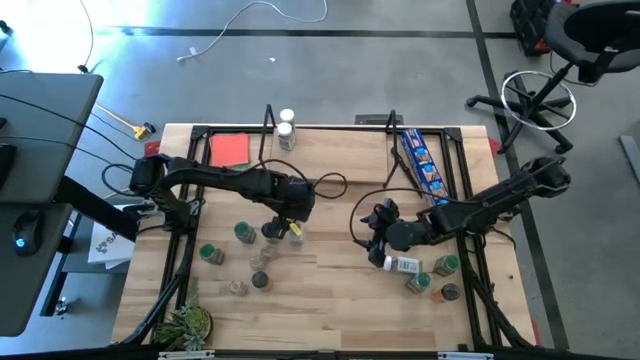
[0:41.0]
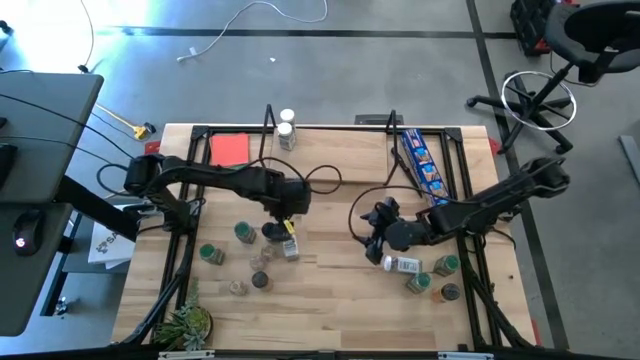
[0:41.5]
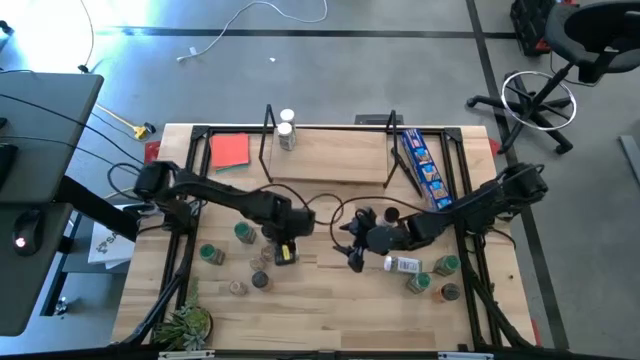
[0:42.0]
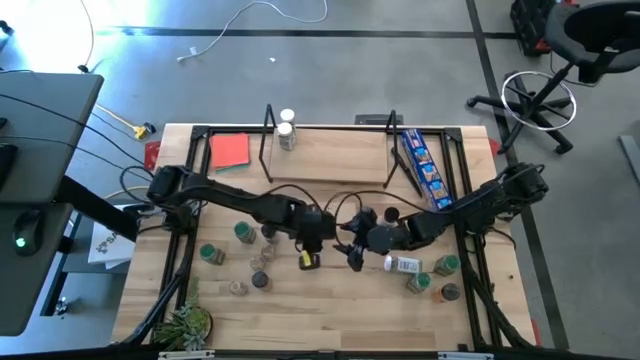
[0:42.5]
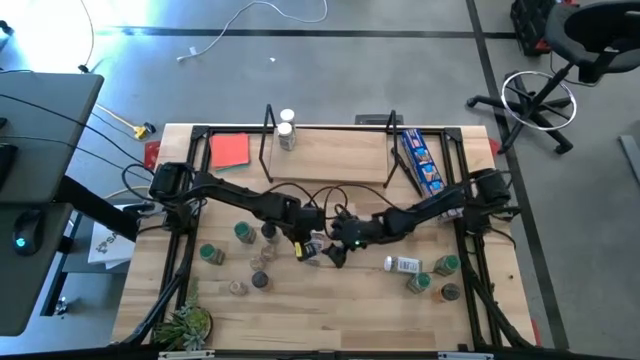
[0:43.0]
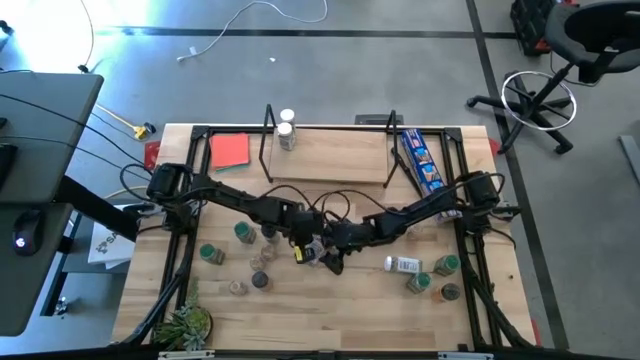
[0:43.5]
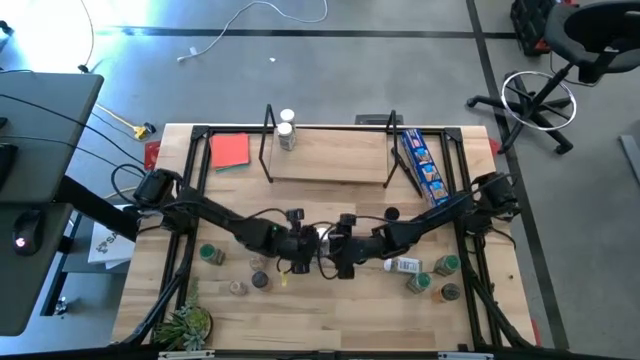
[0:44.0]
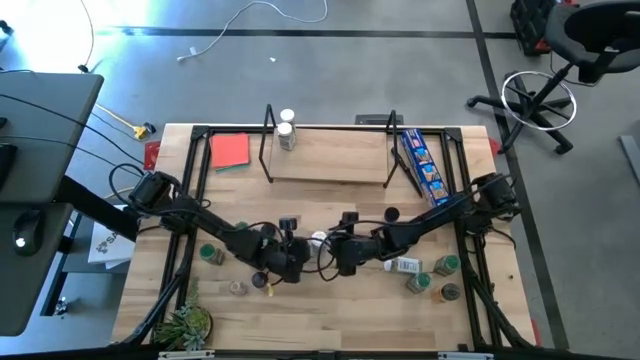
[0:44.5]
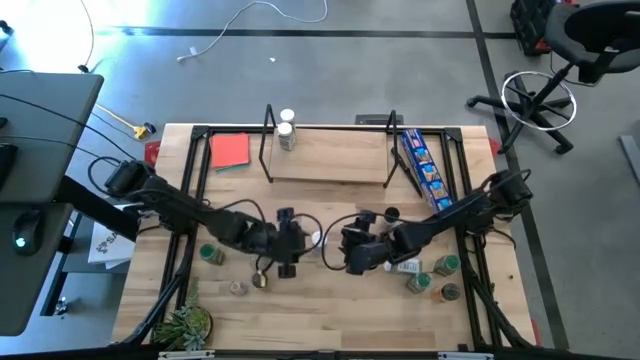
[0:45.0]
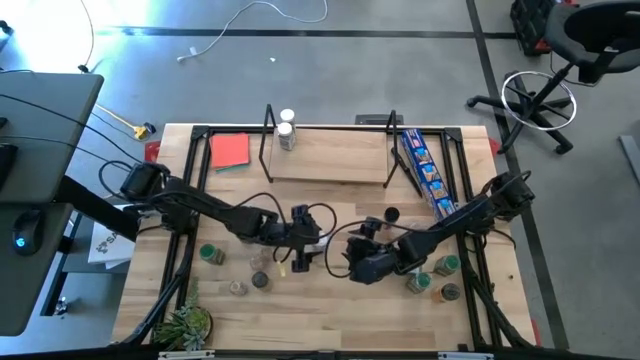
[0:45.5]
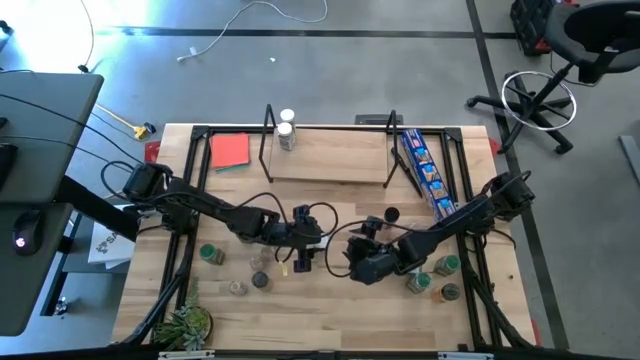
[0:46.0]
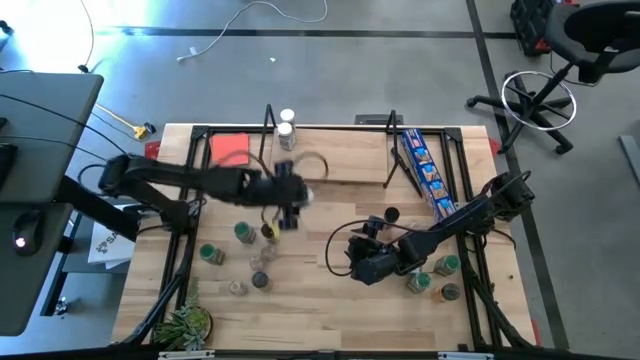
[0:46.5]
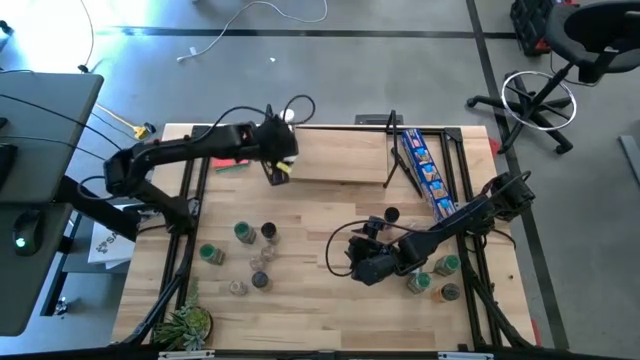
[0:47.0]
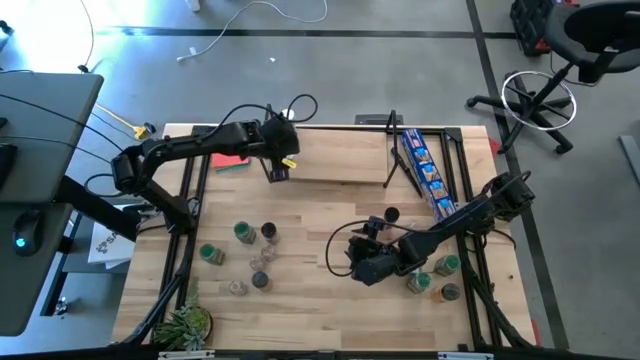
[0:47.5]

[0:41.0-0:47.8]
Task: Shelf spices
Put the white seasoning bottle on the shelf aligned with the other white seasoning bottles

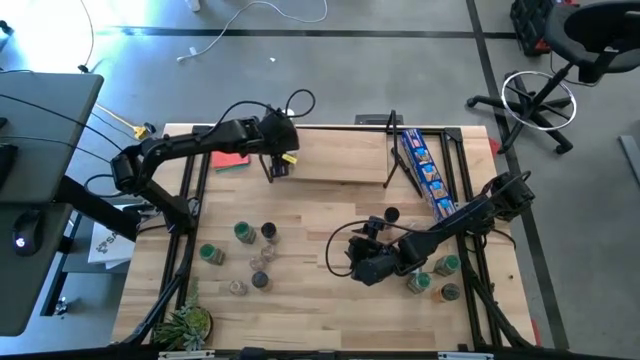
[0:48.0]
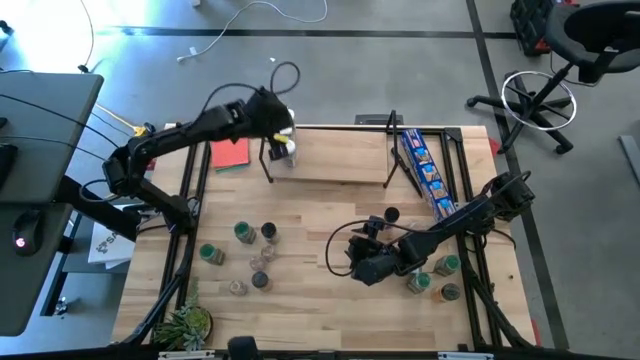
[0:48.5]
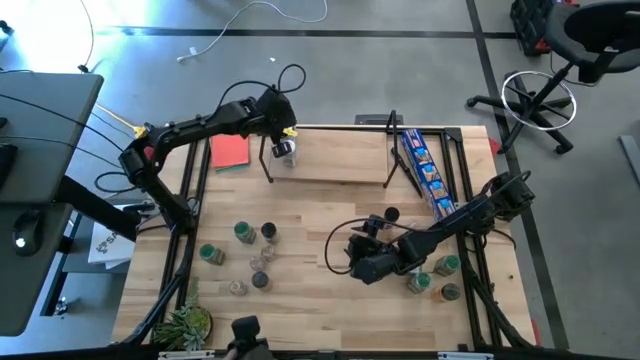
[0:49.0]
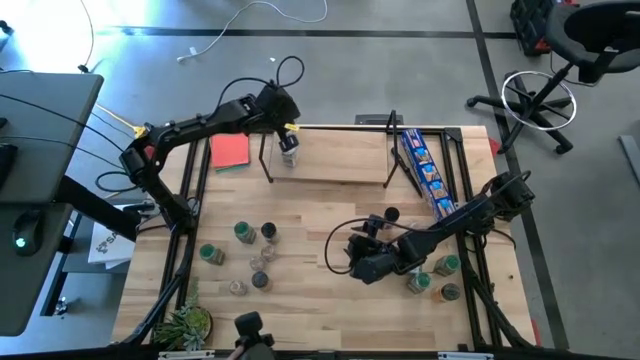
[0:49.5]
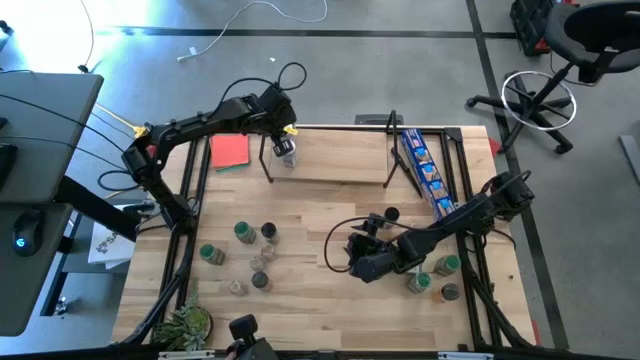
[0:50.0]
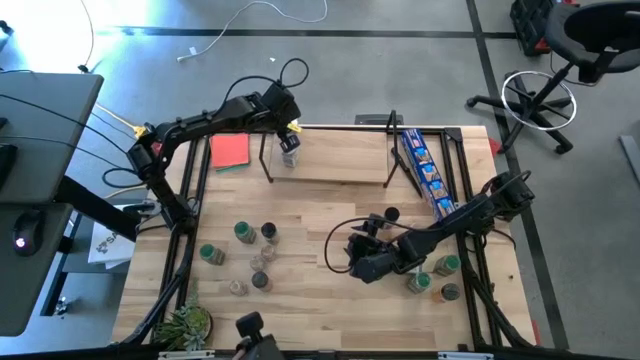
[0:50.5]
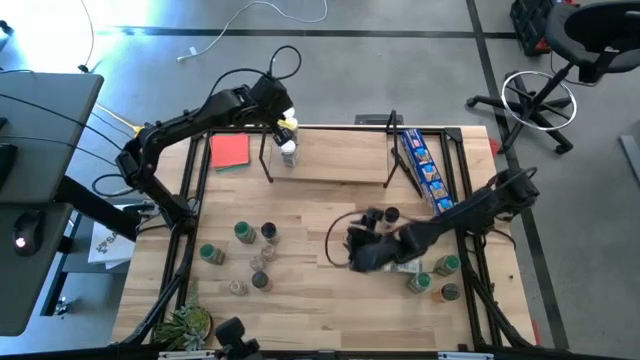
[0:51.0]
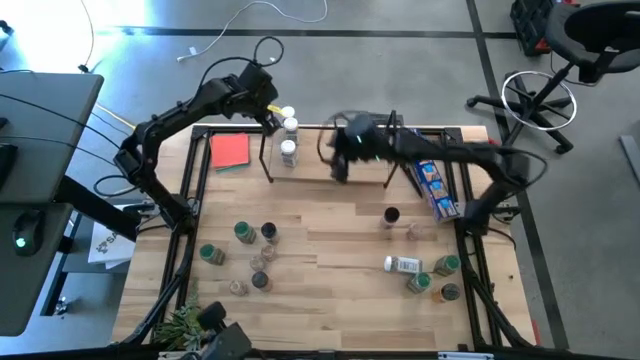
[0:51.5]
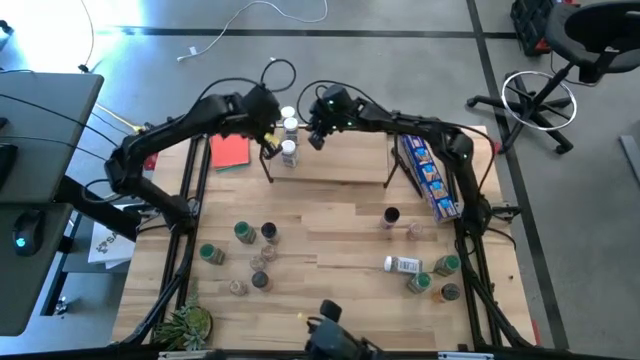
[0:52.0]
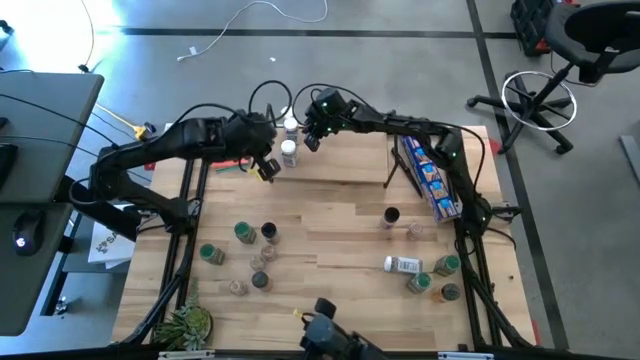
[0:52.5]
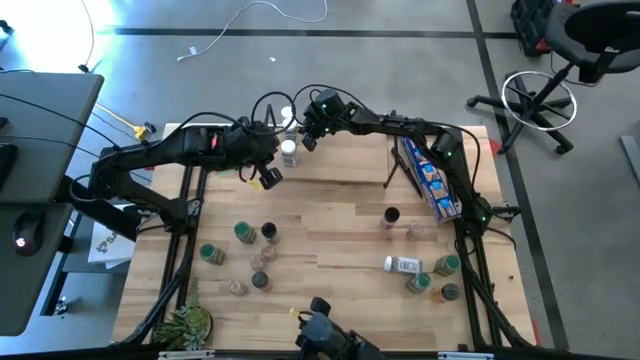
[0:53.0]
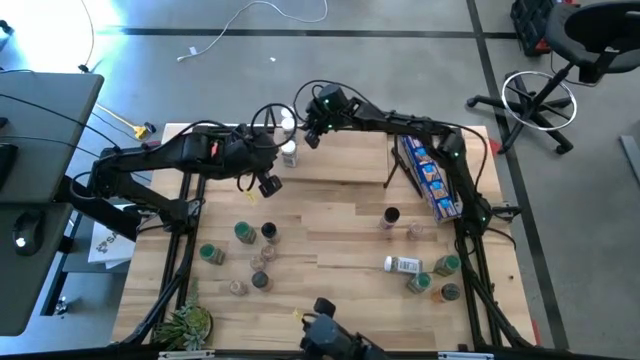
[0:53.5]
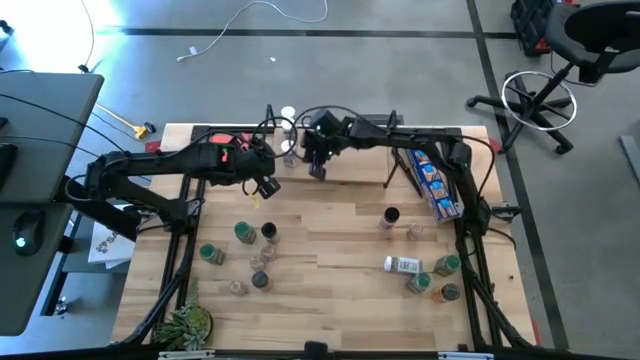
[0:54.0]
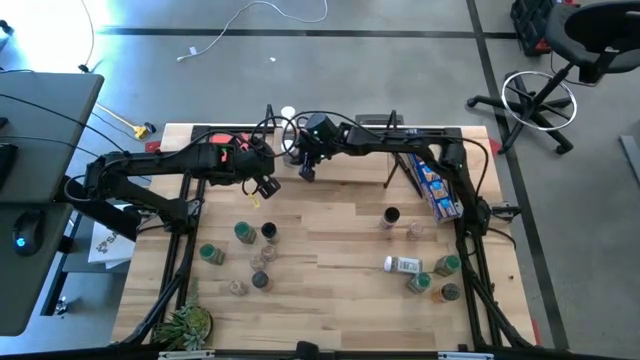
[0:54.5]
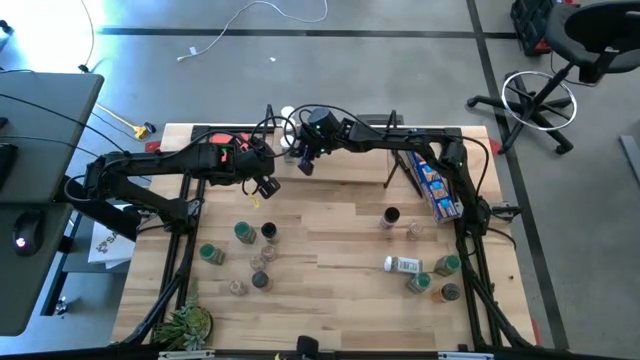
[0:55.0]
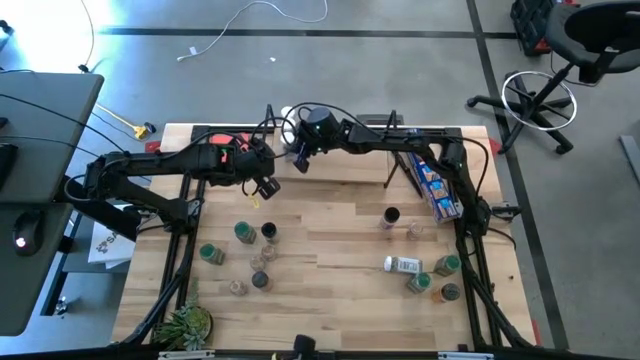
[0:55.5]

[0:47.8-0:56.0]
Adjust the white seasoning bottles on the shelf

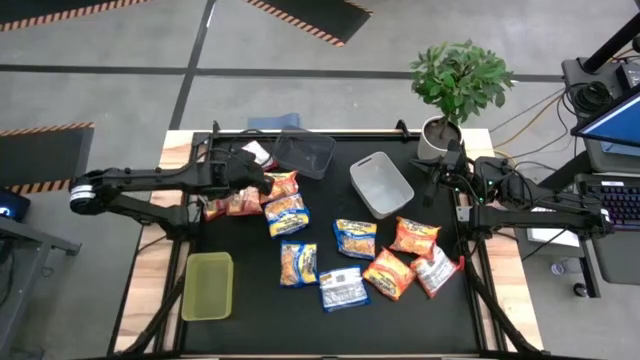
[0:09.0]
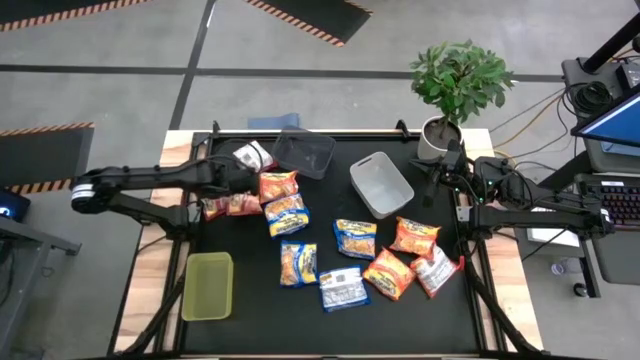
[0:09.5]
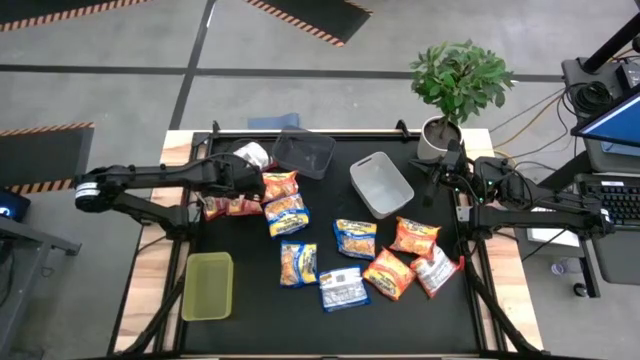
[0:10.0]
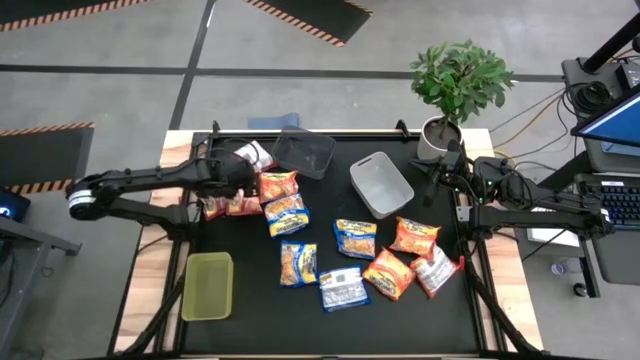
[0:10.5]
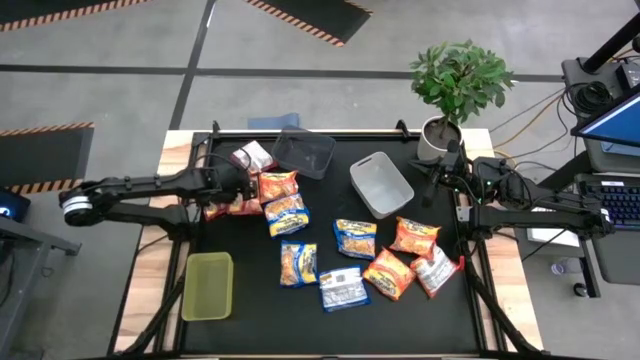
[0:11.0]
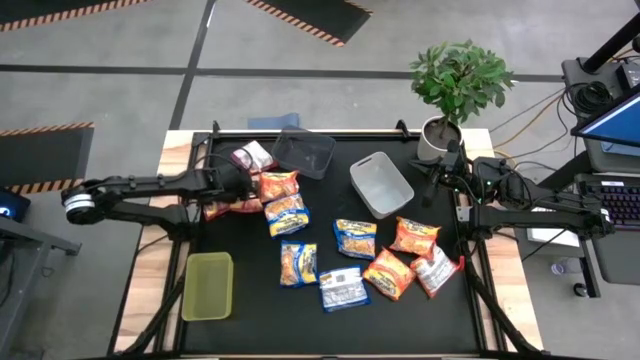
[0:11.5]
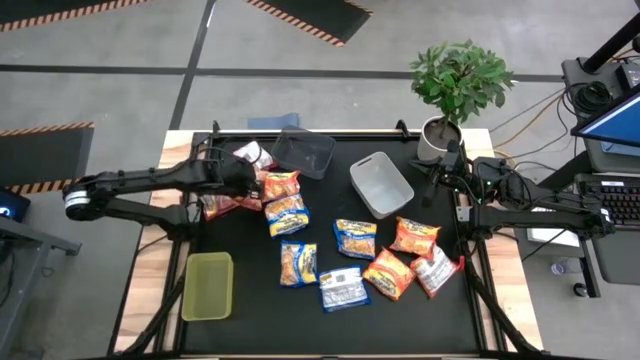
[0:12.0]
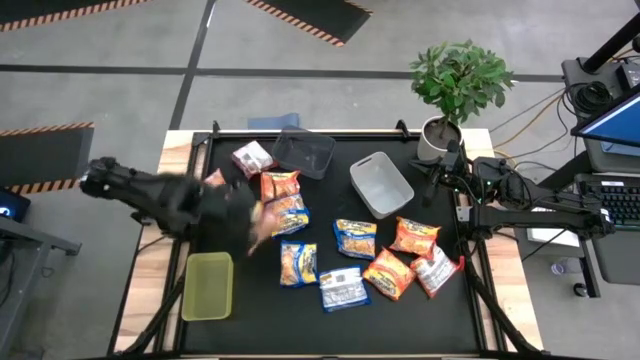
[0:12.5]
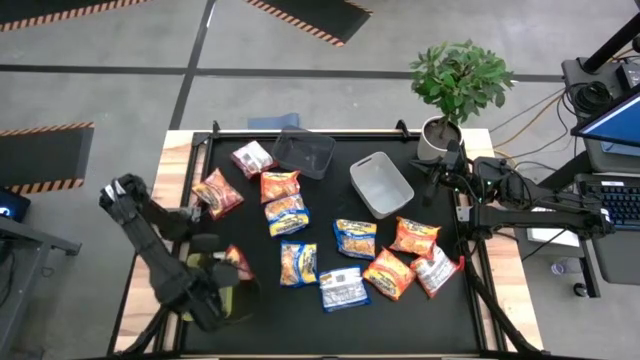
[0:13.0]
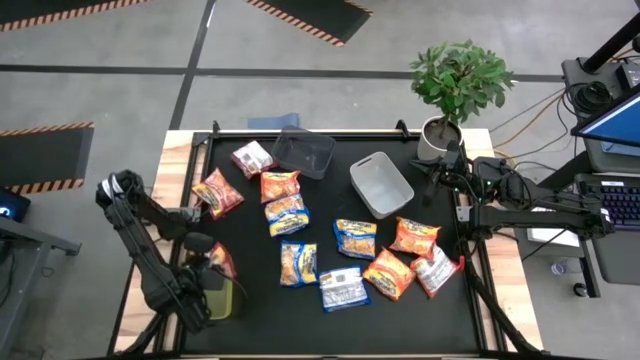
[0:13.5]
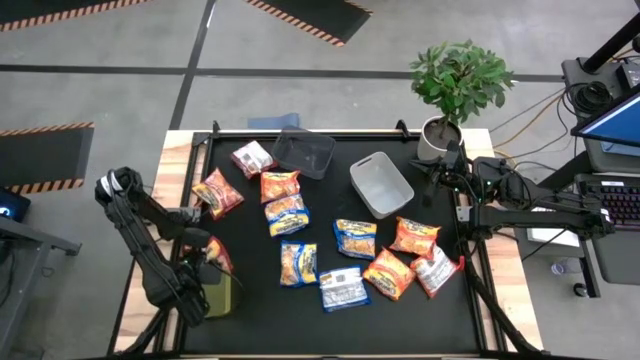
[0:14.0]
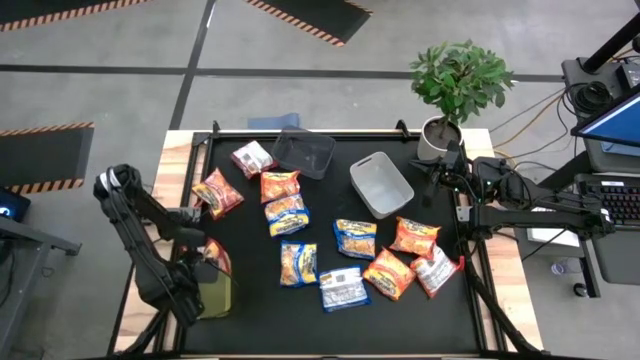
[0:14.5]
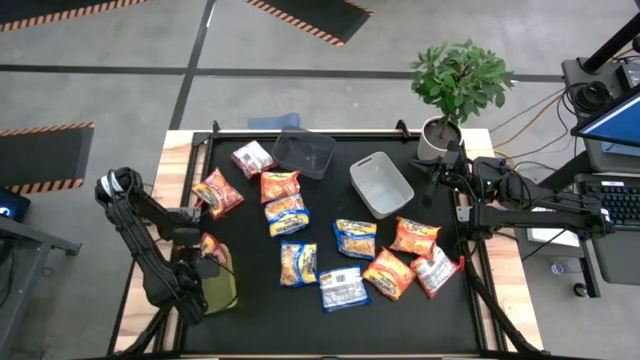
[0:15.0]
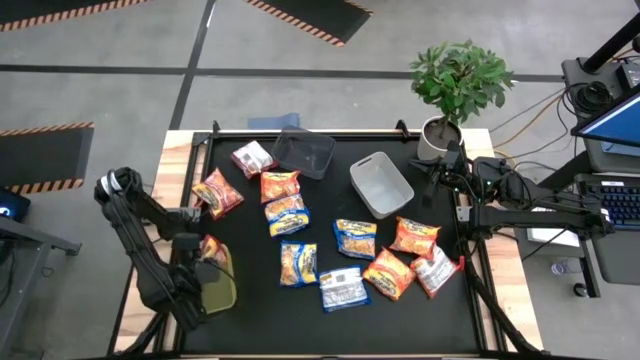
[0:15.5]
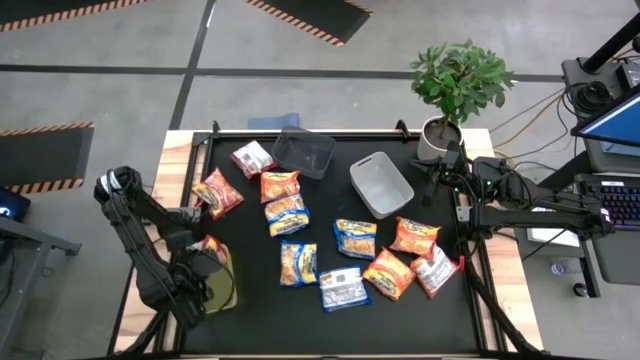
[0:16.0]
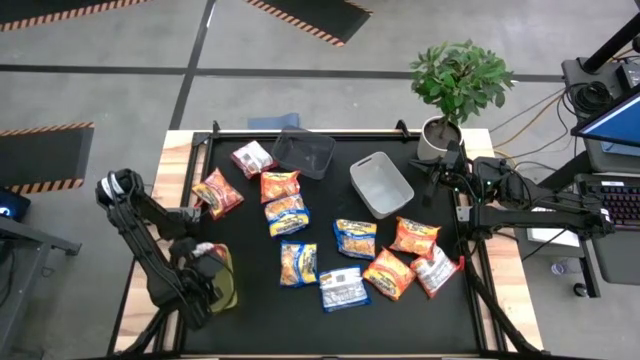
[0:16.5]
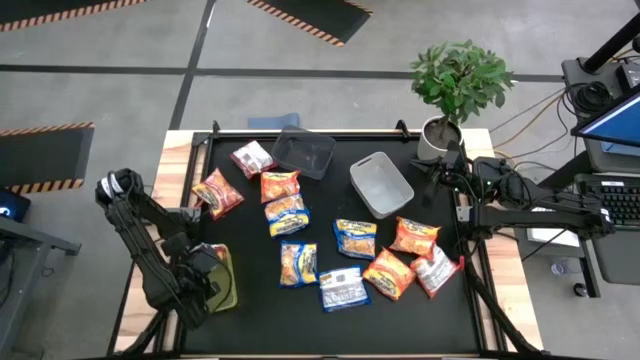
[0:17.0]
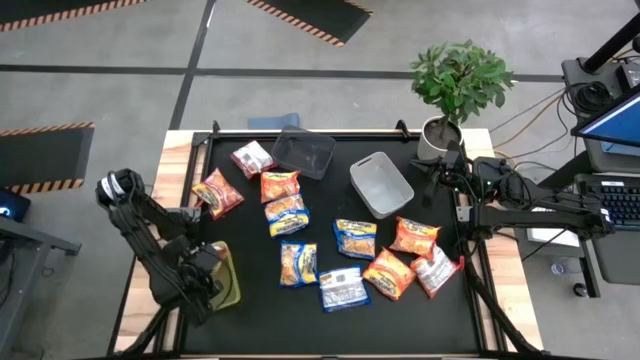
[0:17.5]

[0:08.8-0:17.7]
Task: Sort Maruchan noodles
Put the red noodle pack into the yellow bin
